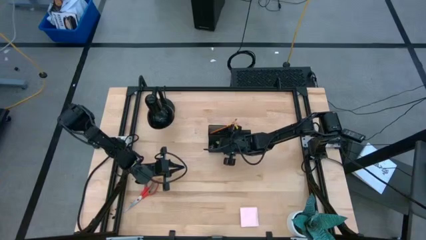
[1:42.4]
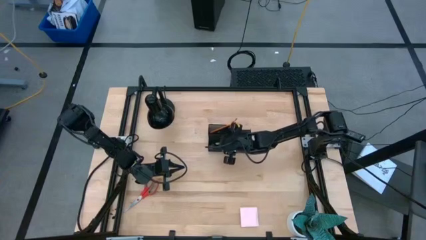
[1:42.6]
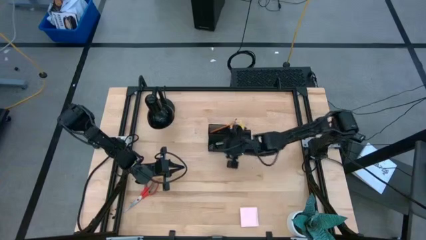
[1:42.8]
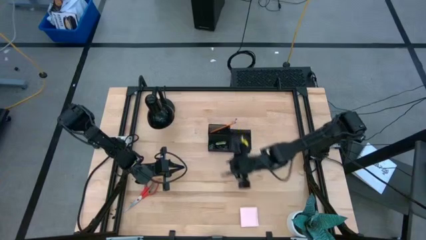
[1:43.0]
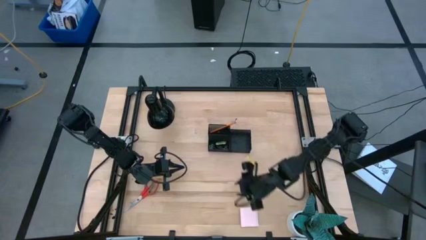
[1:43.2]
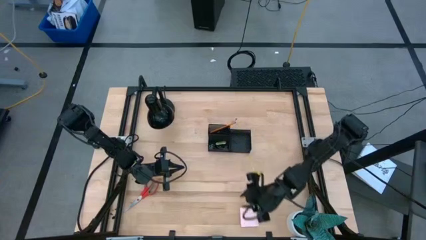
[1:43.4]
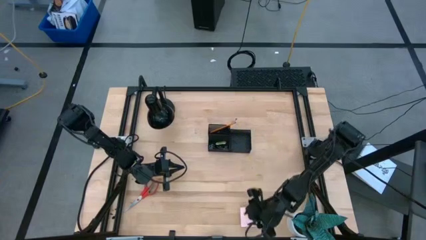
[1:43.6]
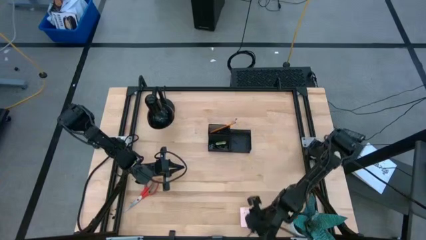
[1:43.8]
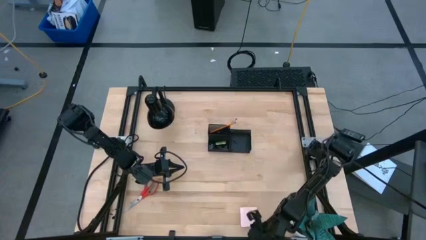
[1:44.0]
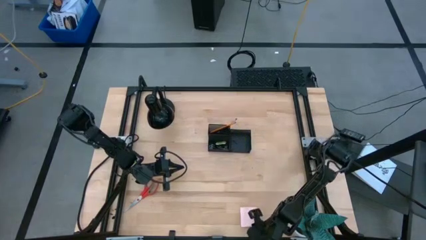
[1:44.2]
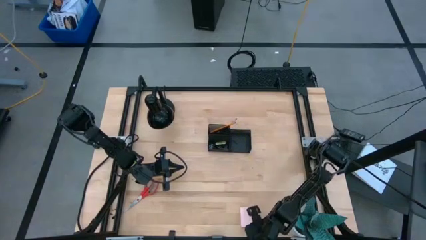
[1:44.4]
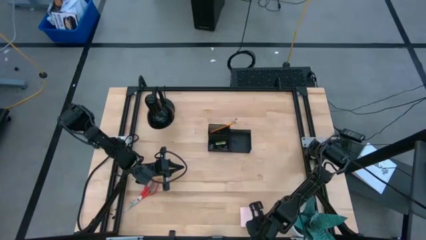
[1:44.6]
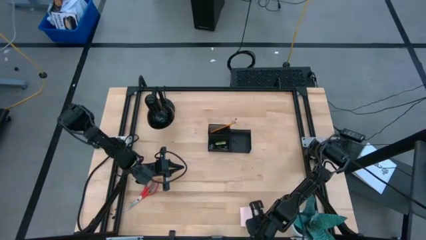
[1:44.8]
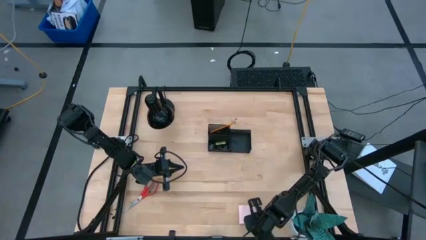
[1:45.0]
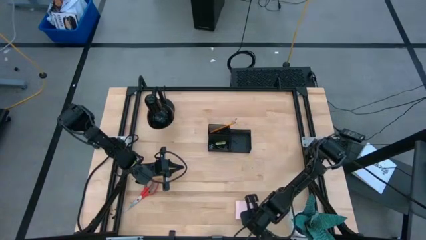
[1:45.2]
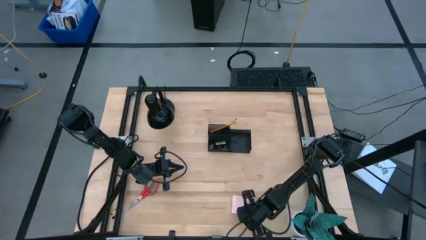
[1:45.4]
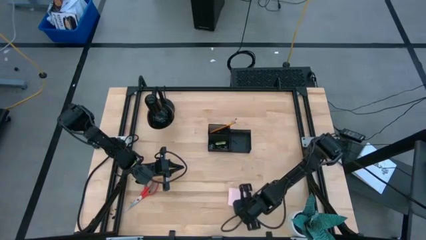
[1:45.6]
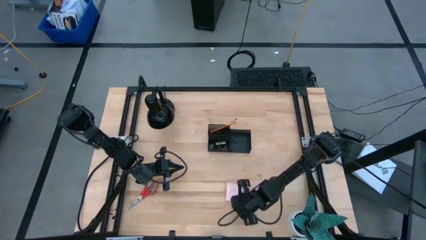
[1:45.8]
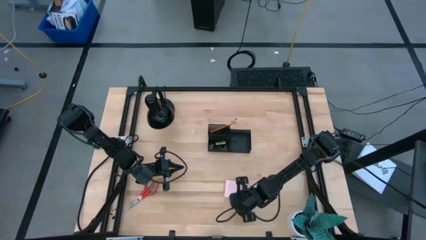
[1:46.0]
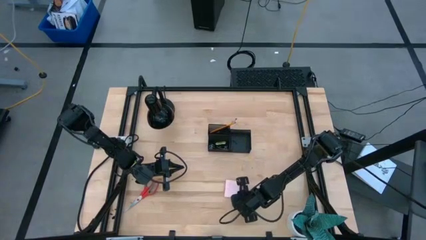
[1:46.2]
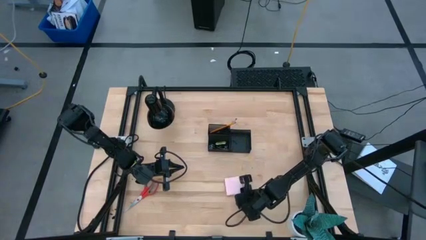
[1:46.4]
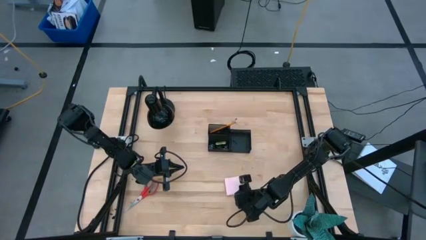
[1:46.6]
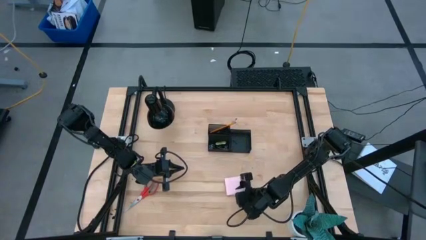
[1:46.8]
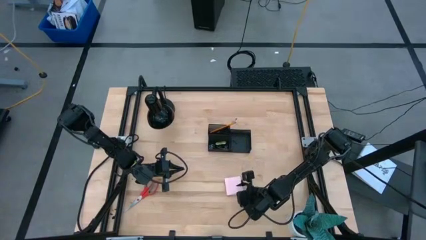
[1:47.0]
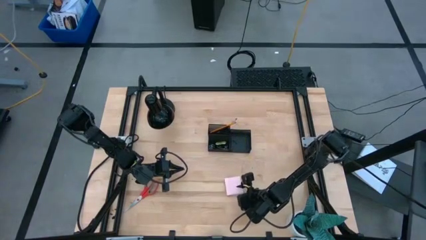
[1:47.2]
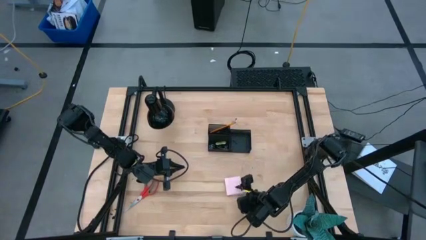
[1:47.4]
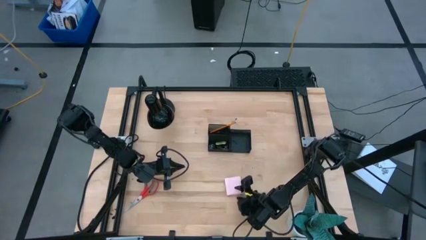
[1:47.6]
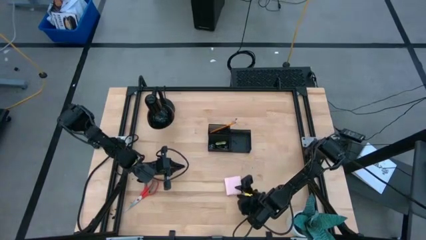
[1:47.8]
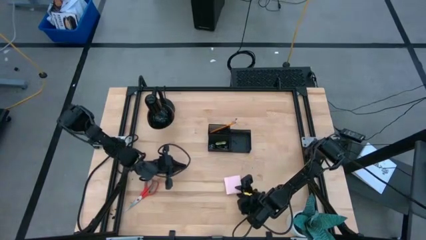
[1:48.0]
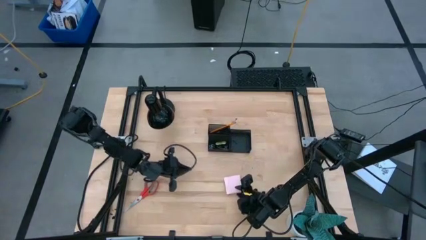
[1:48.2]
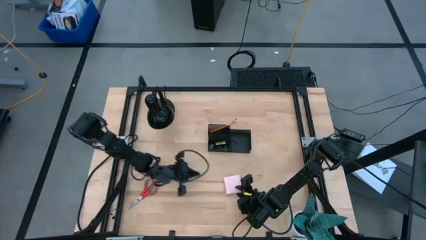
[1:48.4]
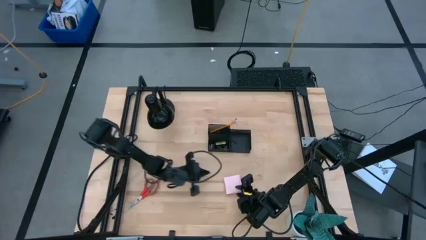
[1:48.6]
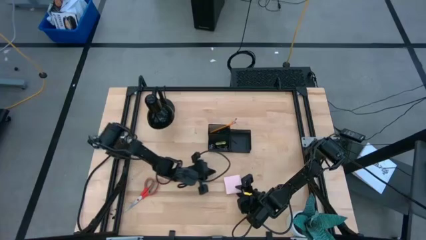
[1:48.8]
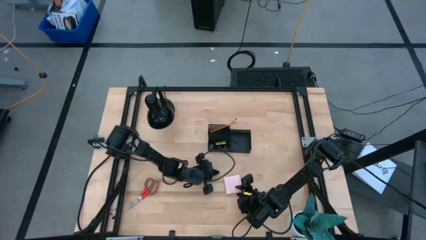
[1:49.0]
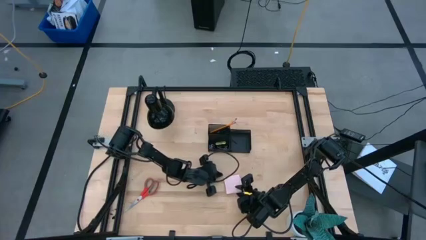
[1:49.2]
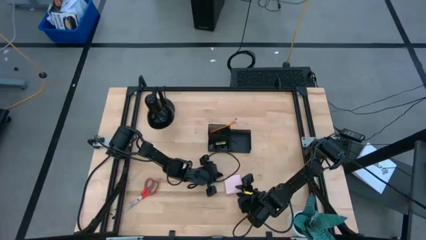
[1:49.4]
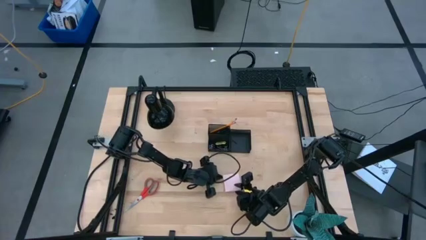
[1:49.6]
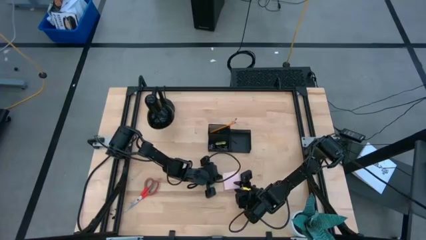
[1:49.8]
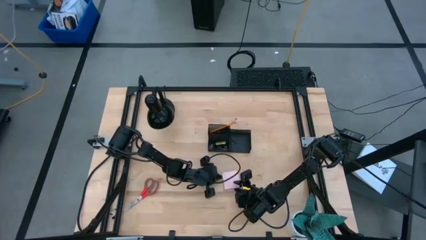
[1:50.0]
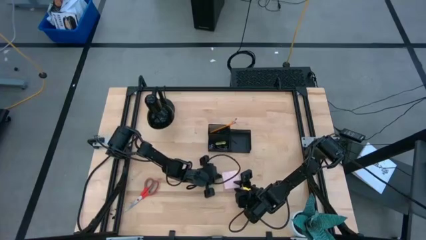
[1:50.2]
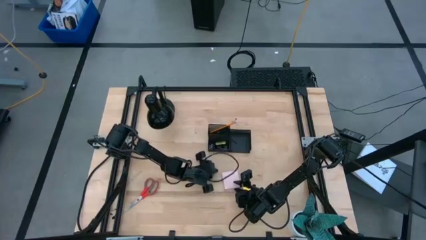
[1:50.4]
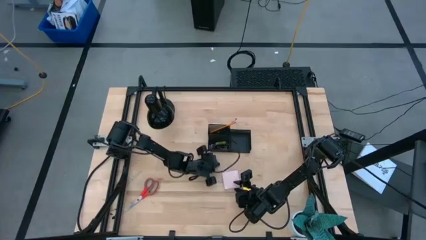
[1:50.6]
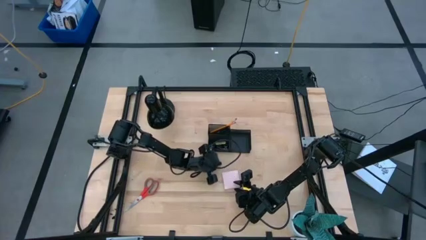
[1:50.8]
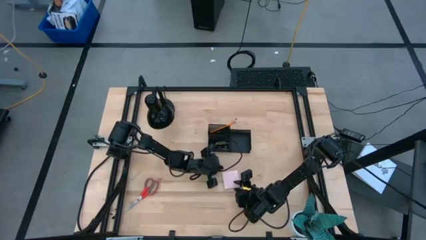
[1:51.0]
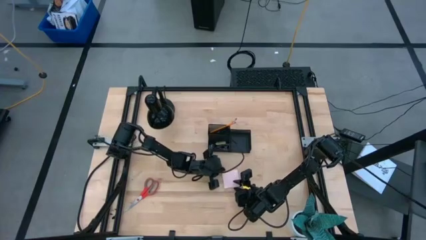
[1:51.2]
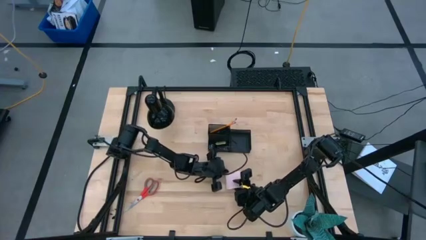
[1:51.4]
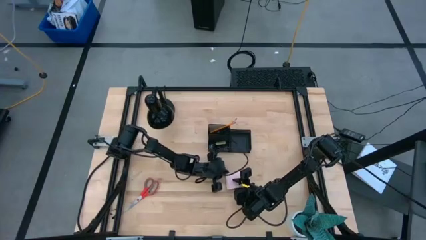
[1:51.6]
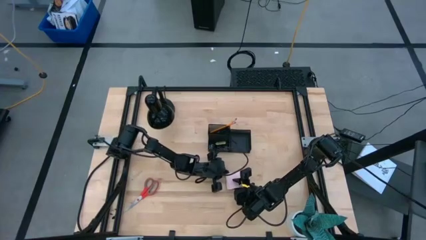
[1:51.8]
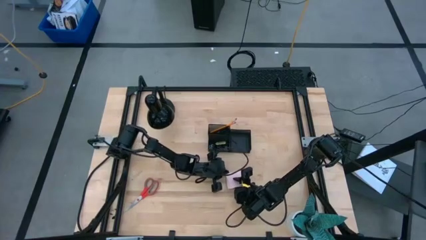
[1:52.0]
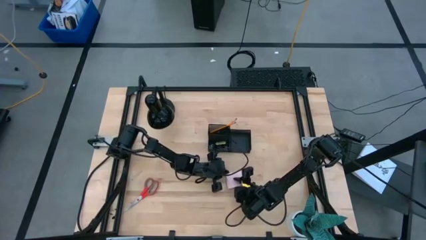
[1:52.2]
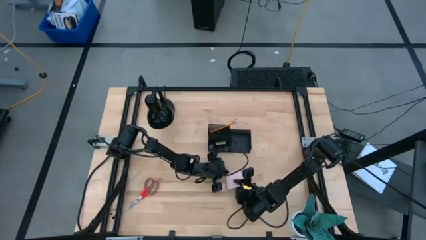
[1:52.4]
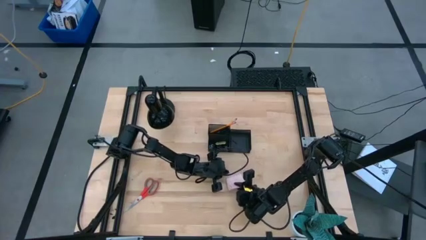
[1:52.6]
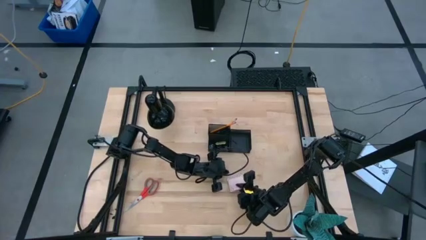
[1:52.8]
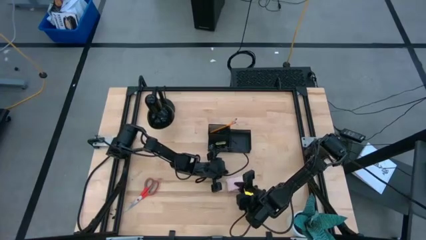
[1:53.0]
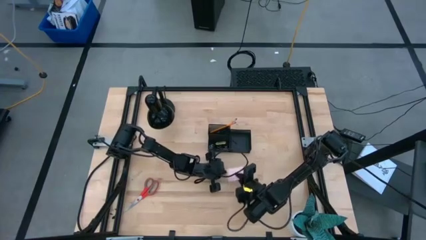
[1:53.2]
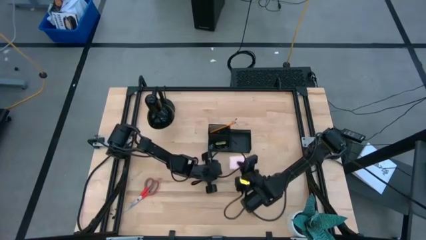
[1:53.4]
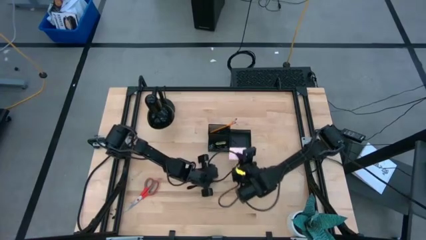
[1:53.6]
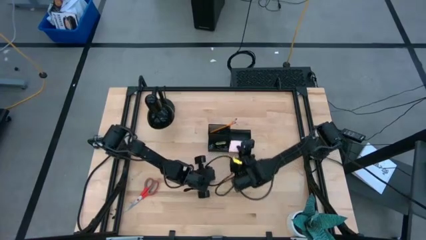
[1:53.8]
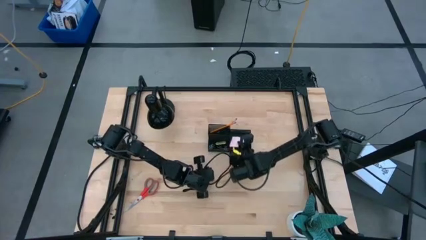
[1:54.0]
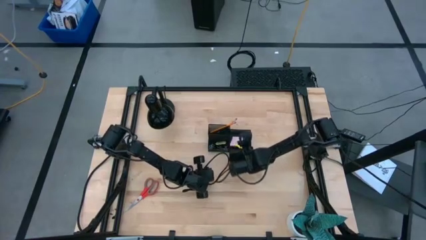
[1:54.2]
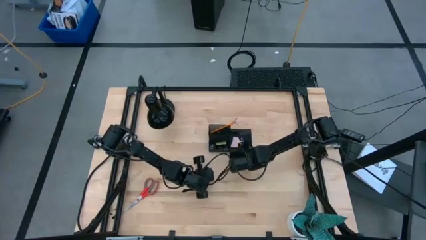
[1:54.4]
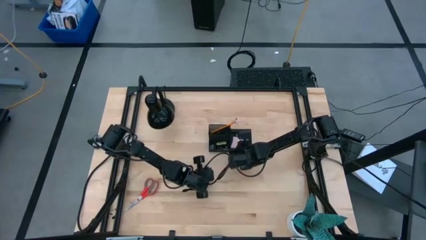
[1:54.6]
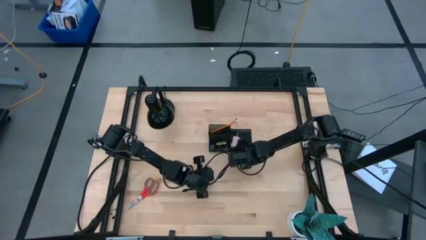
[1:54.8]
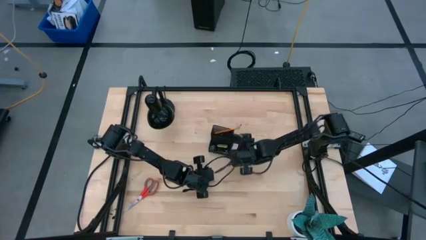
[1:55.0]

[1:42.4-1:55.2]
Task: Pick and place office supplies into organizer
Put the pink sticky note paper into the black desk organizer

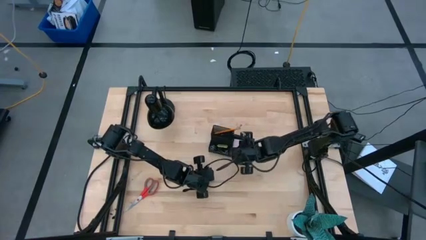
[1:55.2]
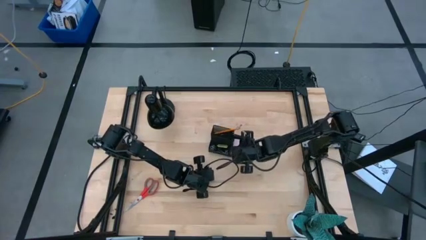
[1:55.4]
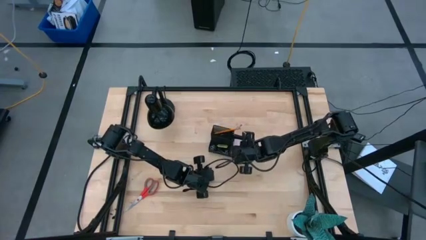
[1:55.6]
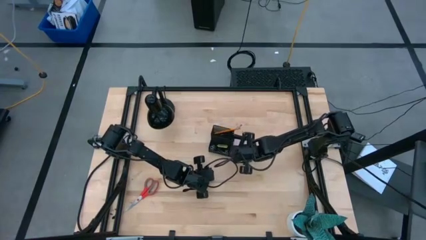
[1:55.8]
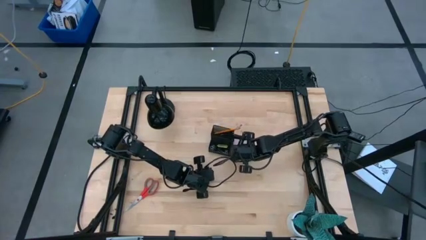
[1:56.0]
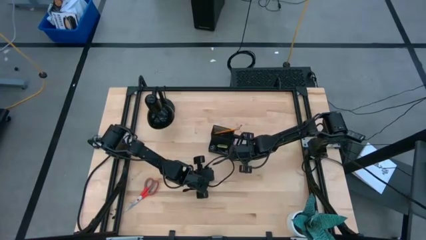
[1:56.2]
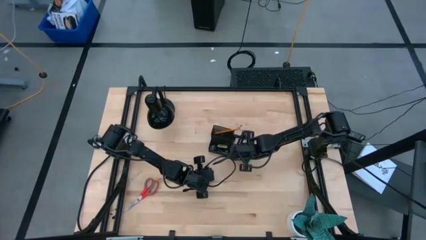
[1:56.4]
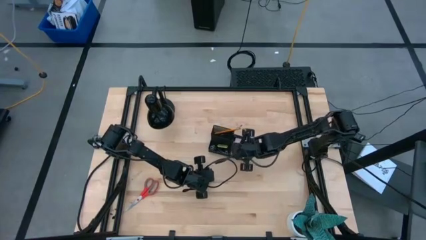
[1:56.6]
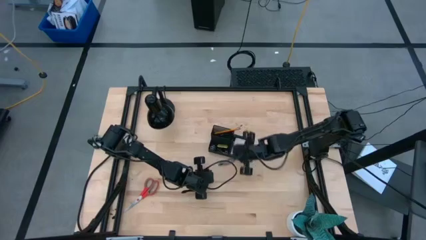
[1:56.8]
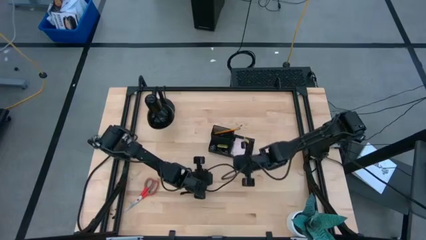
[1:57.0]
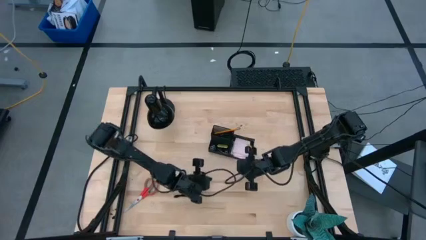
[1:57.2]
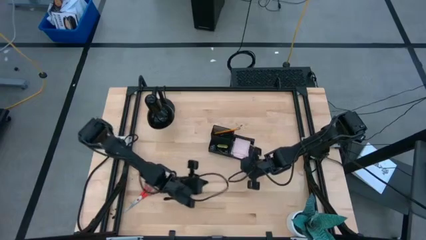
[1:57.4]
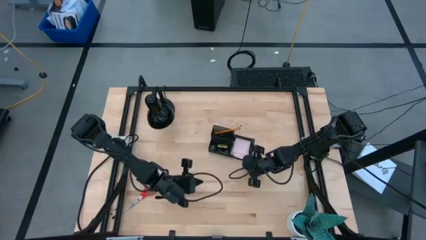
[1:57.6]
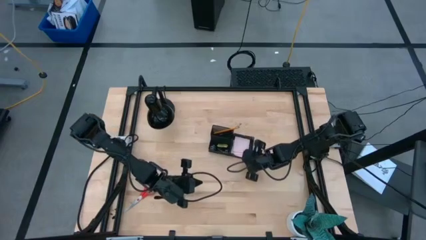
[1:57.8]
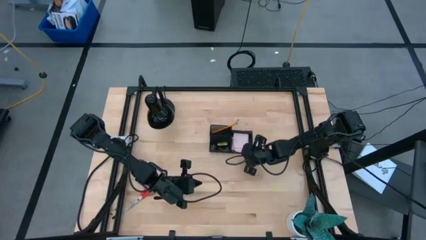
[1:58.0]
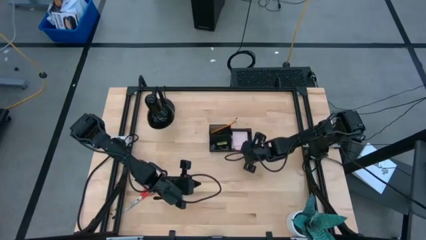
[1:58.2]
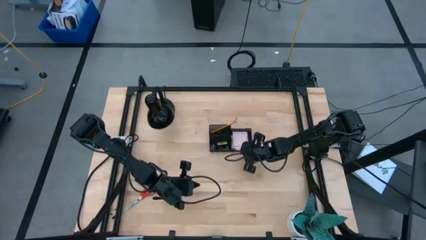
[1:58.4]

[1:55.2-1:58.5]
Adjust the black desk organizer
